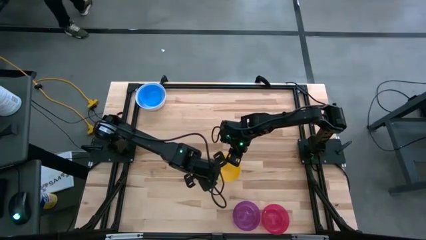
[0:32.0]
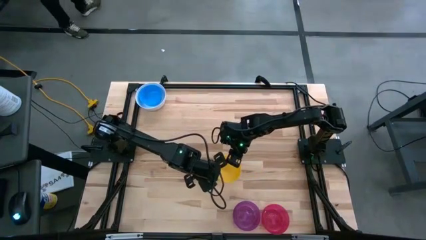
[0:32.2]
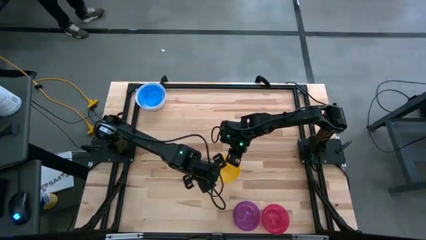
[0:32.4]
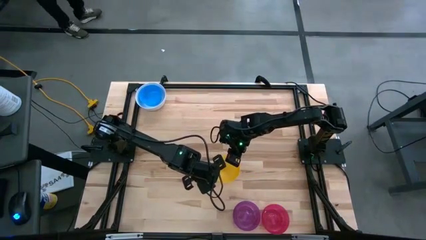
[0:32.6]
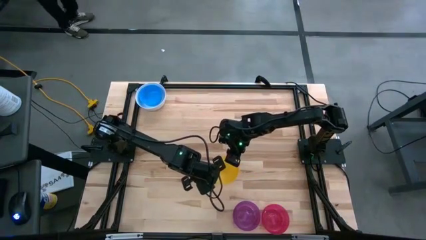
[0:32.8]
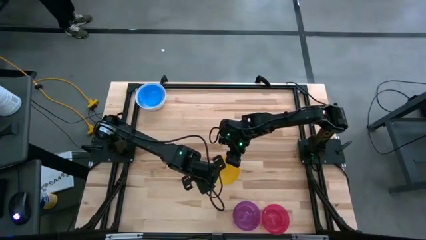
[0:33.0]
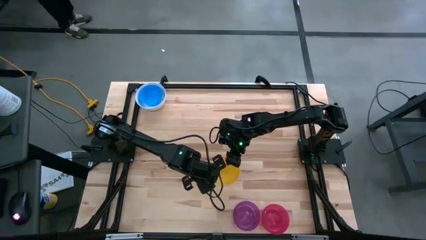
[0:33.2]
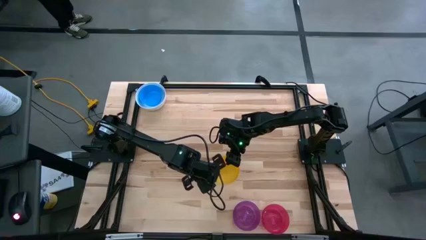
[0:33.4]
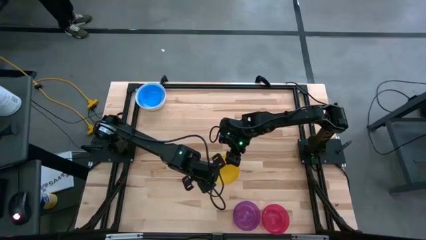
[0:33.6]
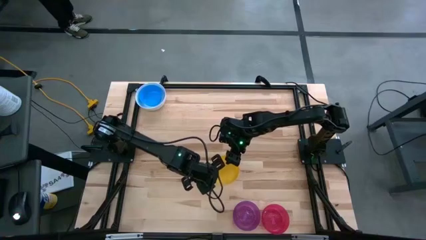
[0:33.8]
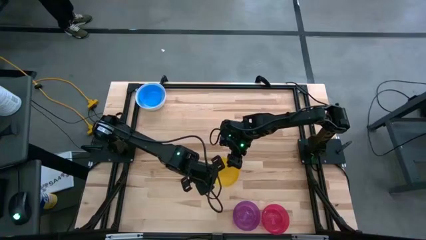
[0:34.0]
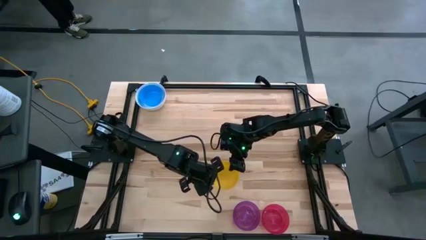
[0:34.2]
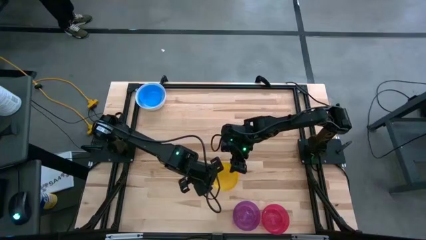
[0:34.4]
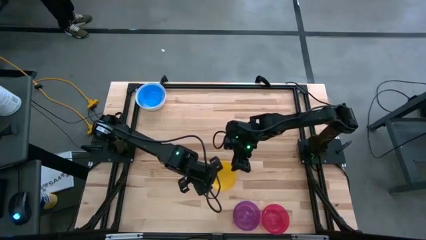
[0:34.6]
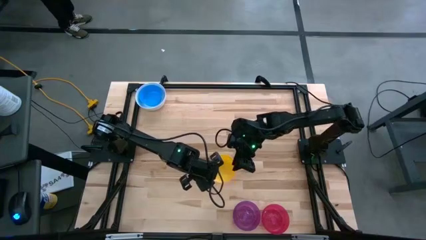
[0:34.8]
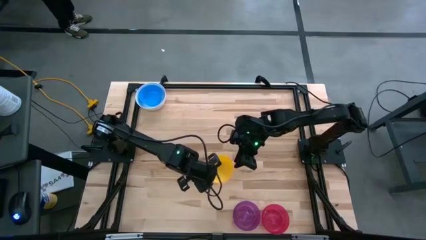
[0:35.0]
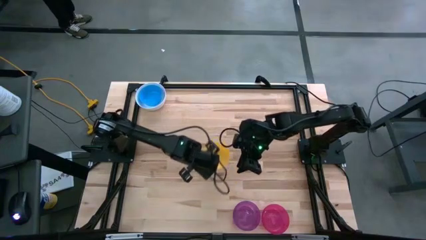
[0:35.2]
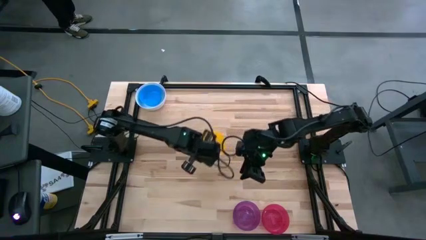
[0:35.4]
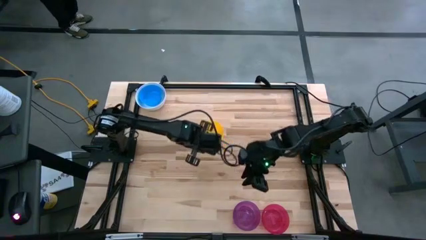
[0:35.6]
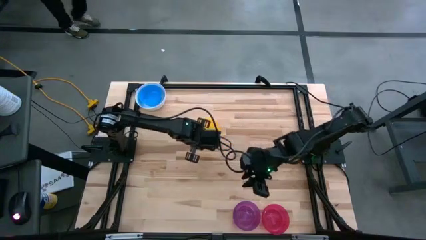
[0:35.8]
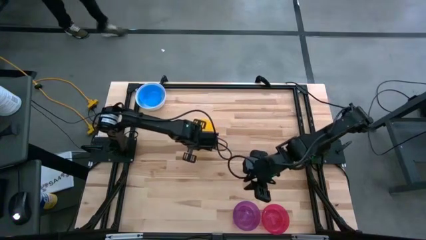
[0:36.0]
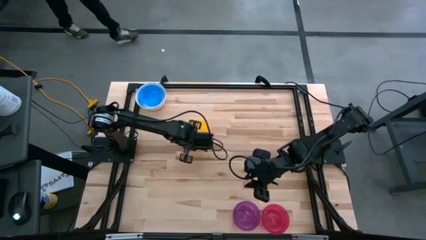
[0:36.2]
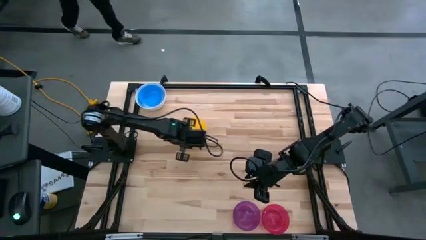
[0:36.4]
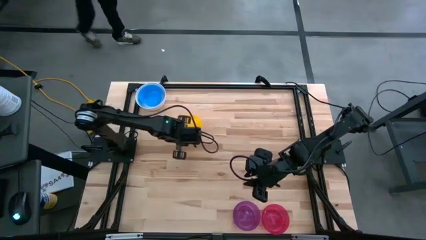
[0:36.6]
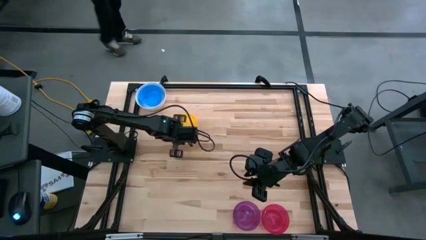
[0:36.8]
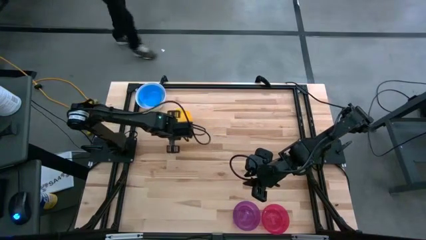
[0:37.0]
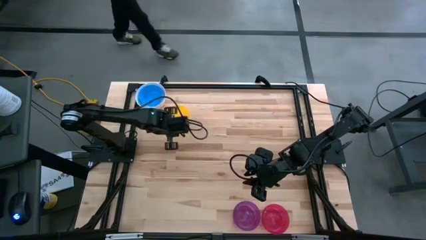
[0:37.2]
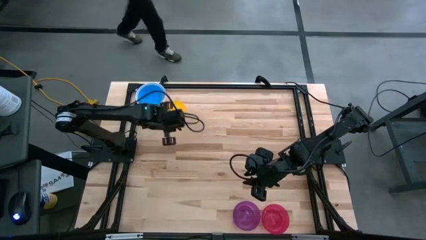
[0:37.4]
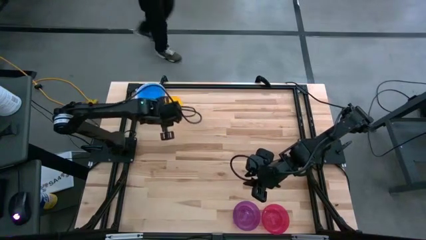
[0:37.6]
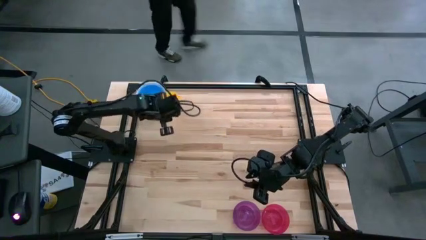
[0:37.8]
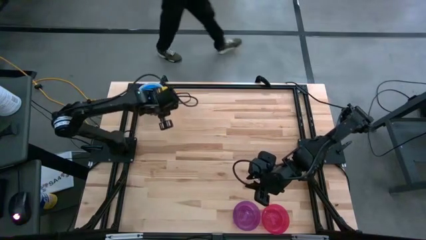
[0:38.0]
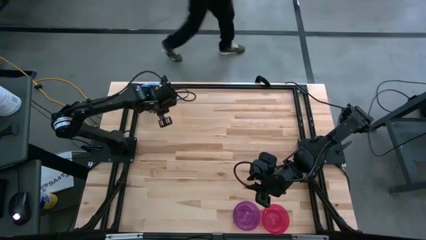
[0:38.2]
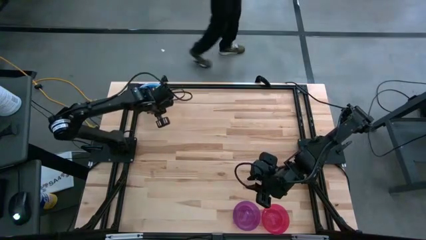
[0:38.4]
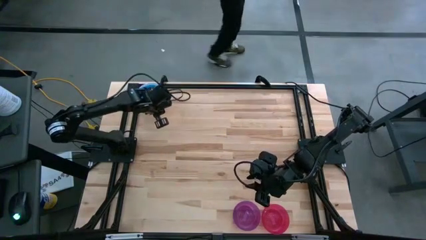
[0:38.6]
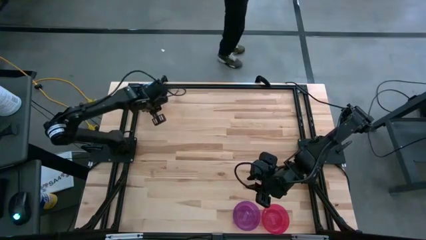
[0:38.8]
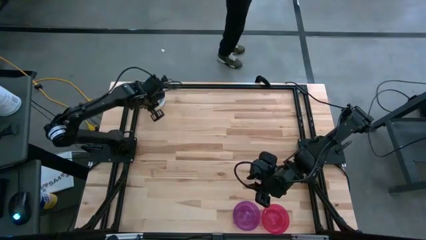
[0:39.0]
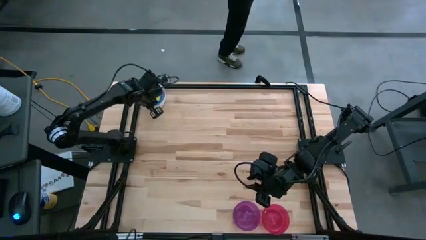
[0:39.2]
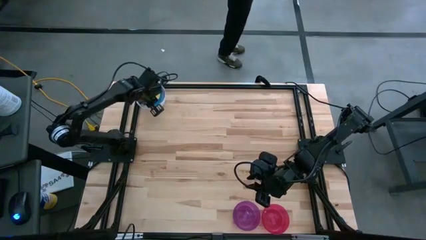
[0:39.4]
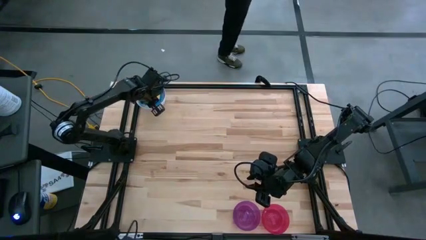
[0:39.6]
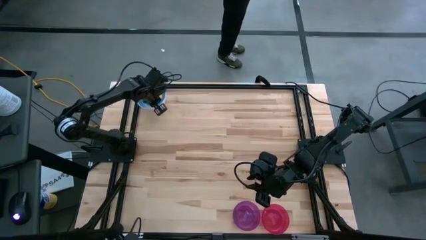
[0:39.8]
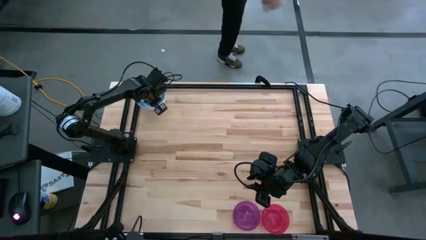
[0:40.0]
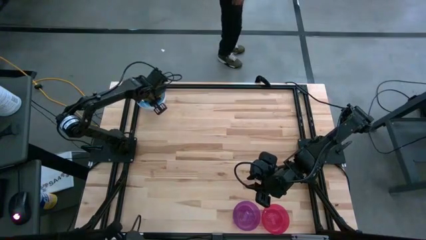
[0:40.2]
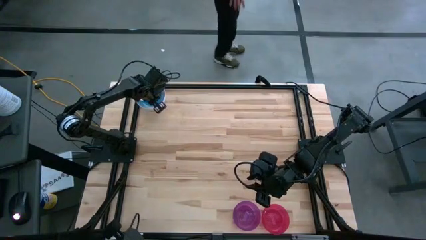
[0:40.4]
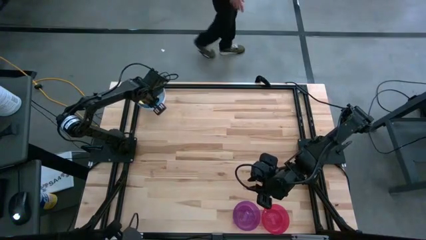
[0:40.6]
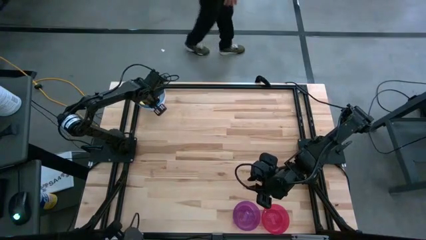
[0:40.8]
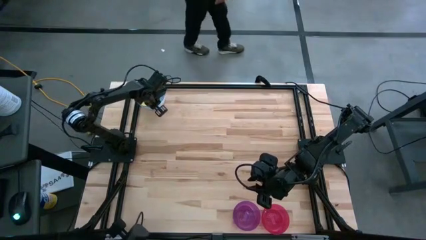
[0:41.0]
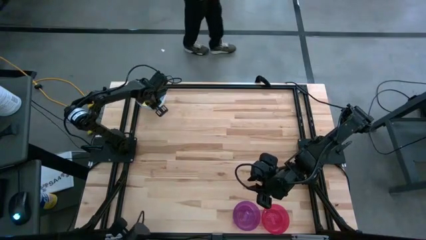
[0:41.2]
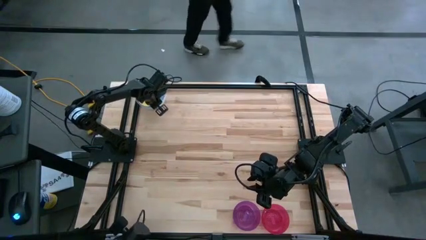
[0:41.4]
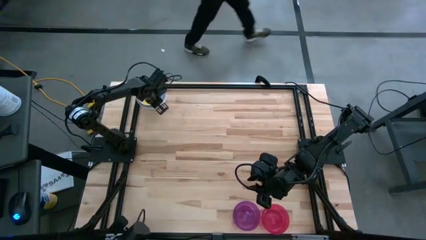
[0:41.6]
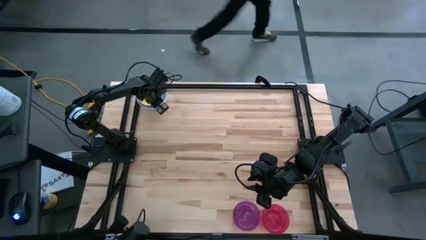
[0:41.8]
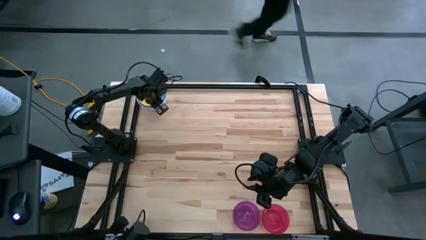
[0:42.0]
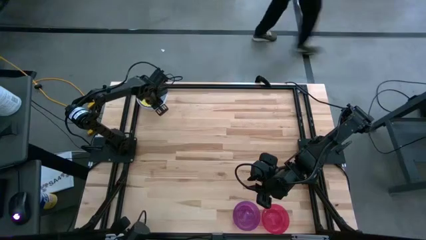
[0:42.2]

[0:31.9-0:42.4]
Stack the yellow bowl on the blue bowl

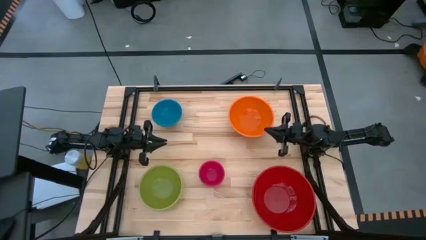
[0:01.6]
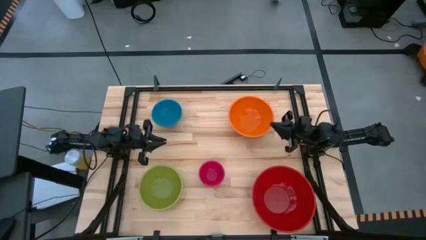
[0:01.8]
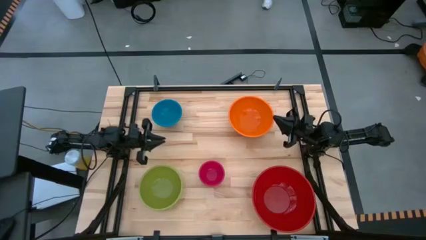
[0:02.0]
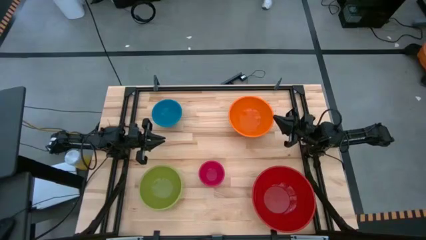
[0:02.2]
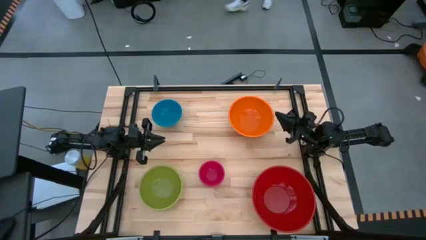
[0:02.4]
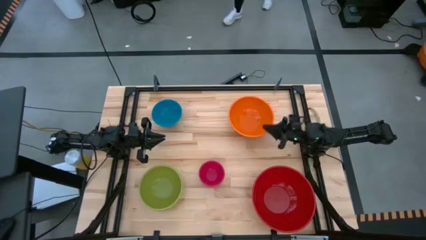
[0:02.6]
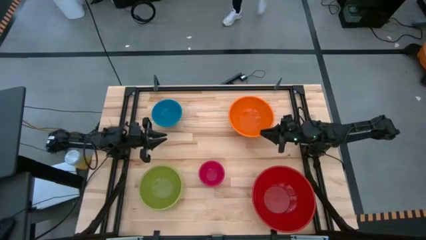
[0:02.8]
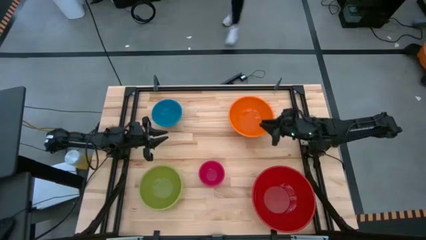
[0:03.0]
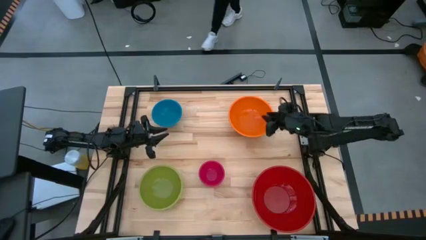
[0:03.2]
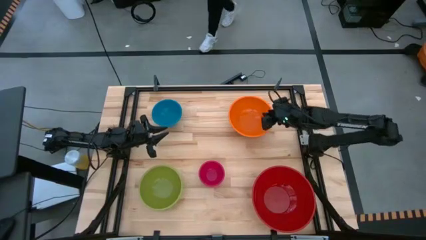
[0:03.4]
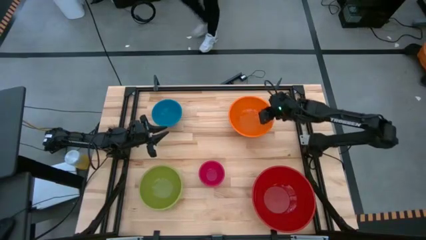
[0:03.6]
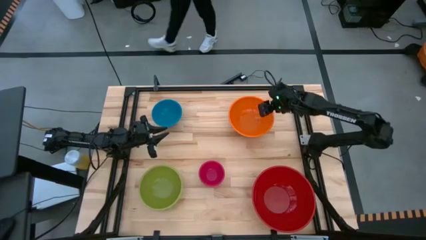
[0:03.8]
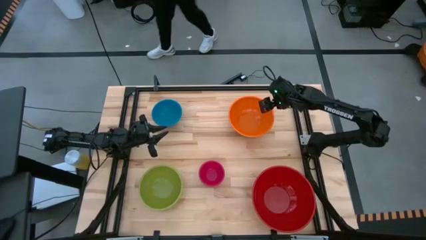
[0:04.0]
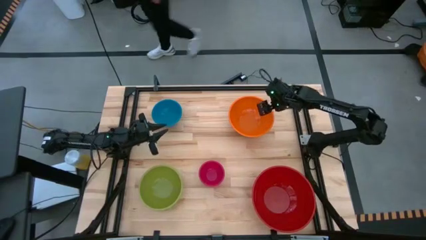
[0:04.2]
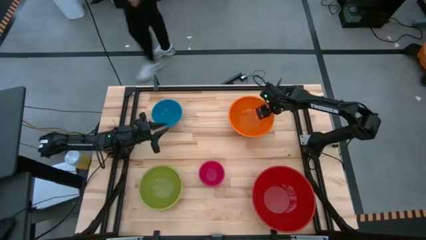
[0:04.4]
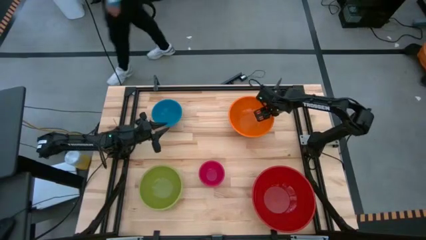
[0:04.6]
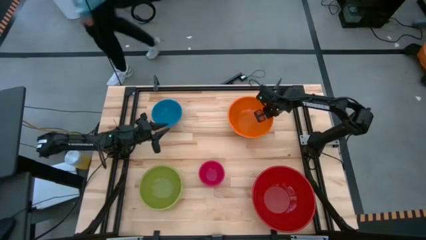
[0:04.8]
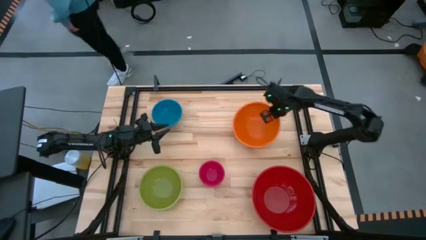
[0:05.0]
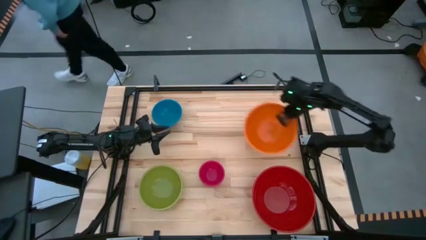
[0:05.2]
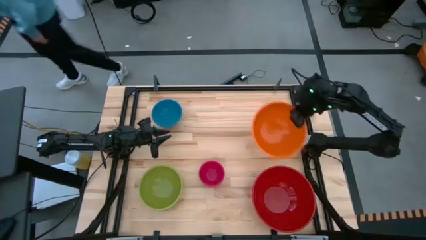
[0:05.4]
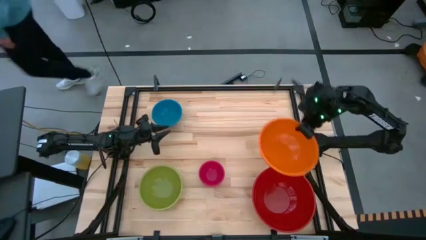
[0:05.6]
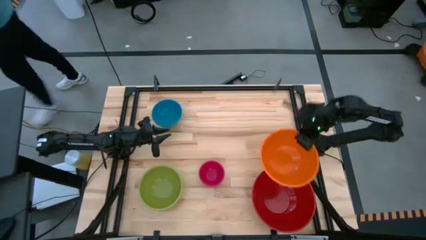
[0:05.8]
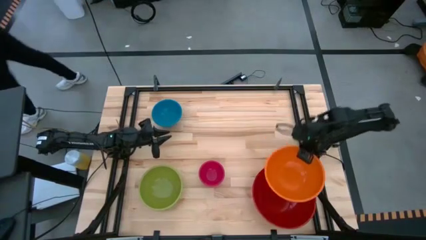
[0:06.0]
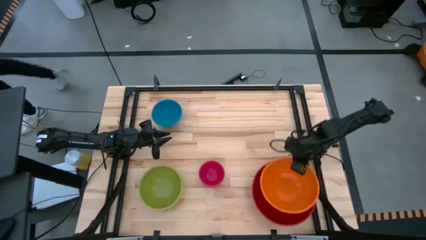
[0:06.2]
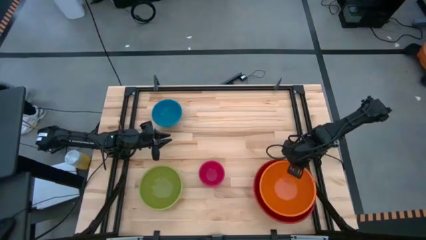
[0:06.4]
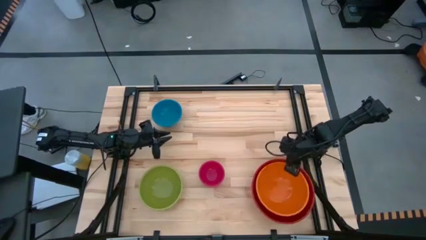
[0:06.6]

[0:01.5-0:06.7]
Stack the orange bowl on top of the red bowl
